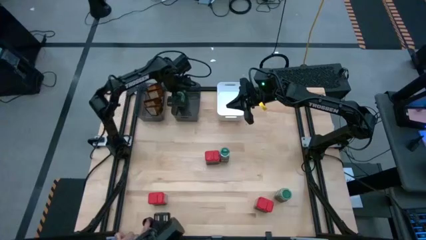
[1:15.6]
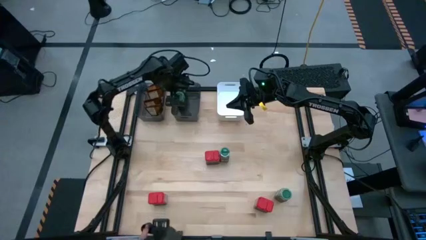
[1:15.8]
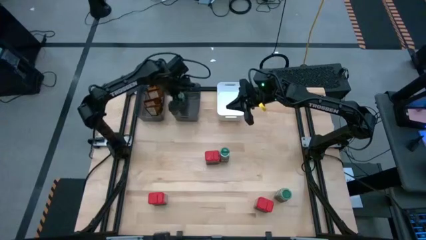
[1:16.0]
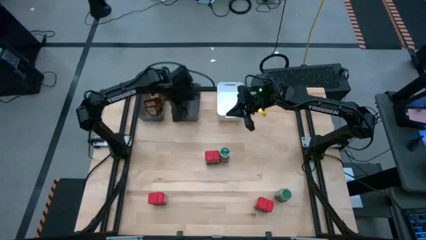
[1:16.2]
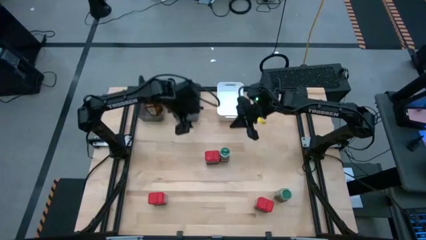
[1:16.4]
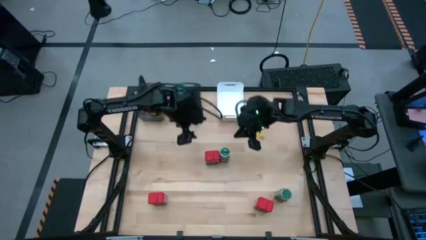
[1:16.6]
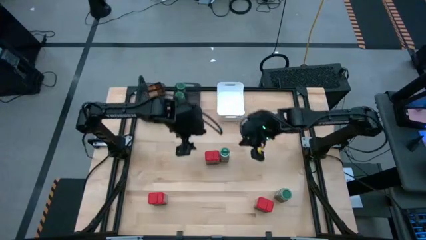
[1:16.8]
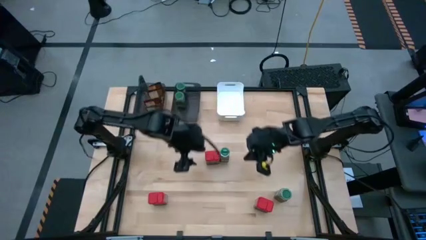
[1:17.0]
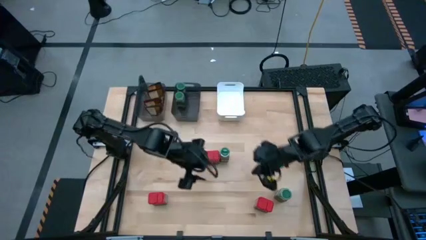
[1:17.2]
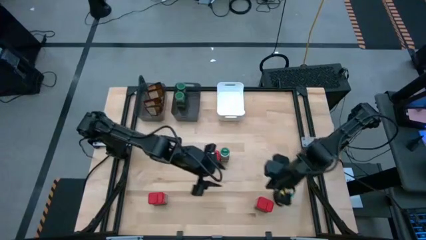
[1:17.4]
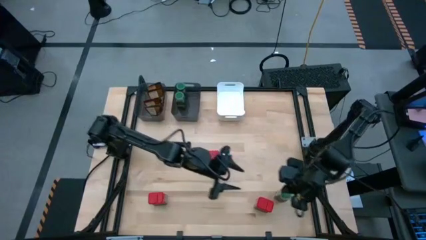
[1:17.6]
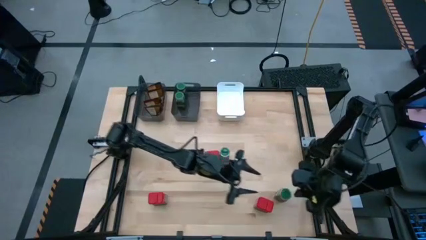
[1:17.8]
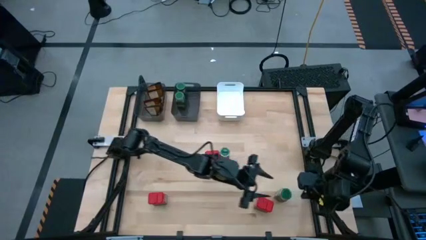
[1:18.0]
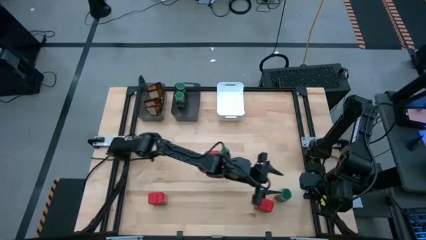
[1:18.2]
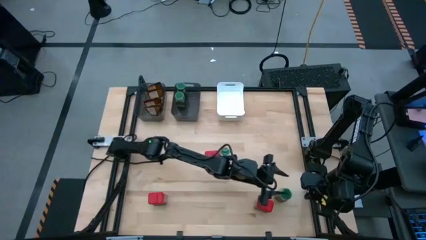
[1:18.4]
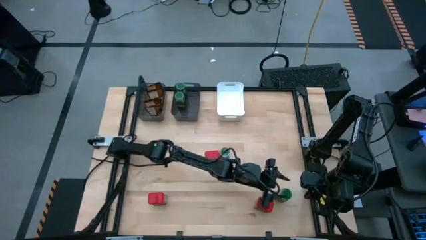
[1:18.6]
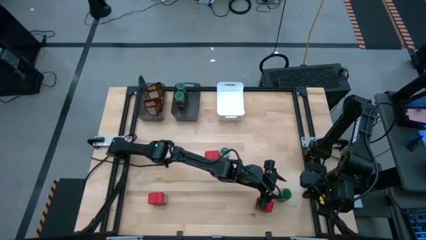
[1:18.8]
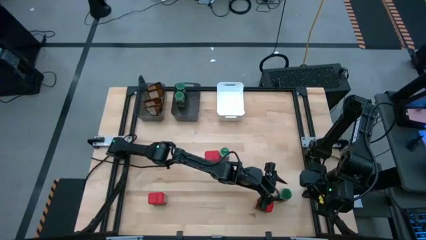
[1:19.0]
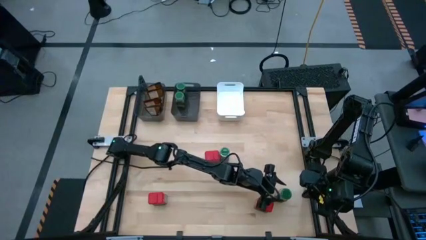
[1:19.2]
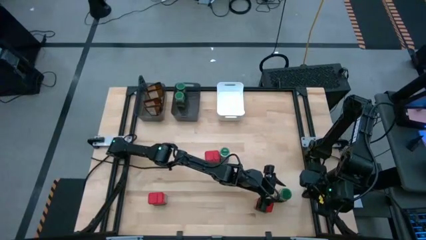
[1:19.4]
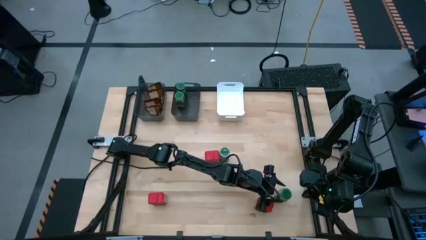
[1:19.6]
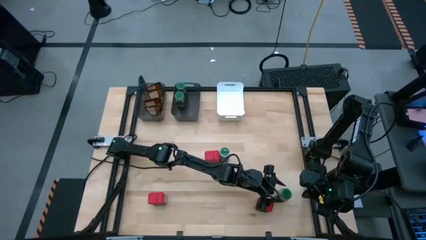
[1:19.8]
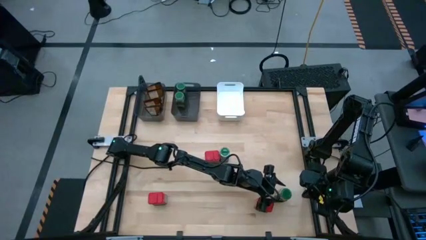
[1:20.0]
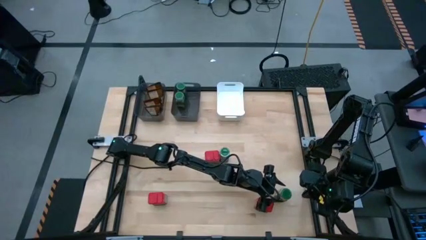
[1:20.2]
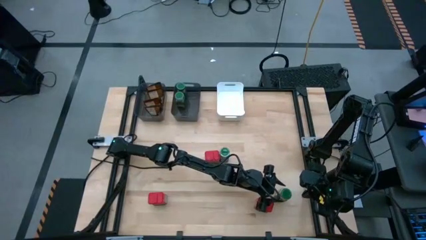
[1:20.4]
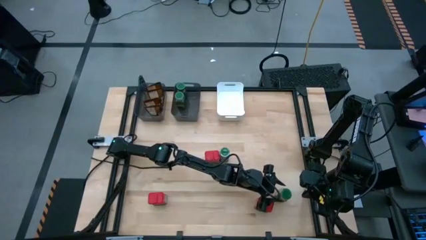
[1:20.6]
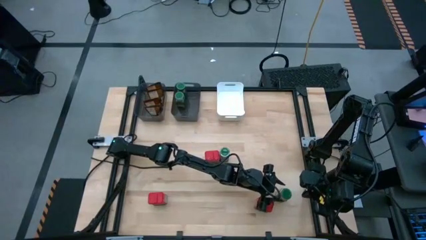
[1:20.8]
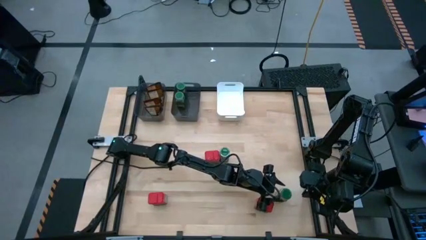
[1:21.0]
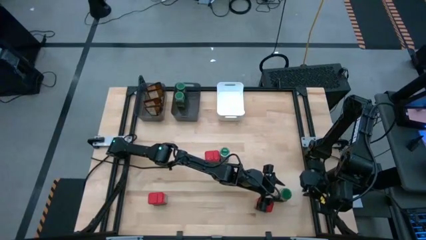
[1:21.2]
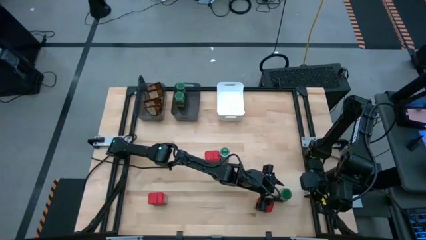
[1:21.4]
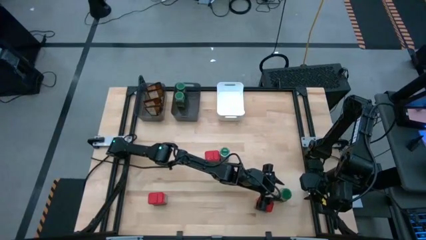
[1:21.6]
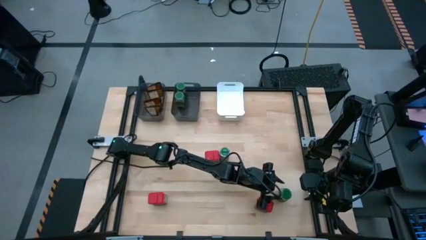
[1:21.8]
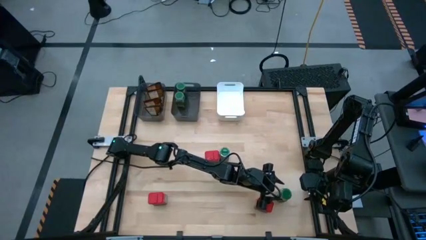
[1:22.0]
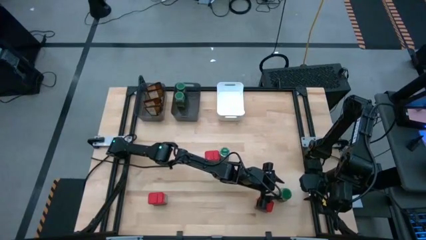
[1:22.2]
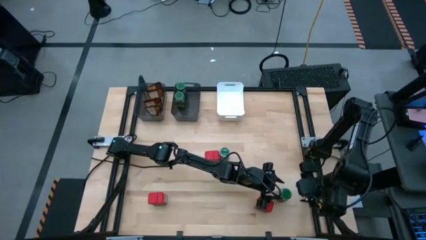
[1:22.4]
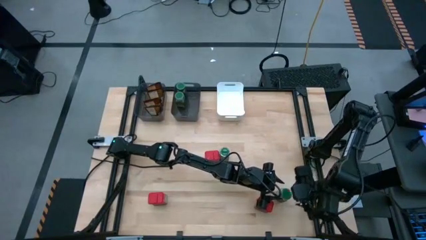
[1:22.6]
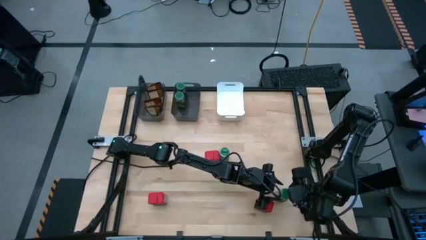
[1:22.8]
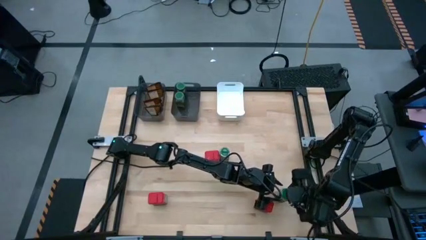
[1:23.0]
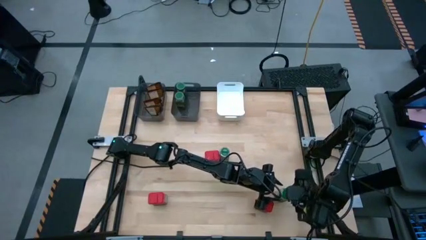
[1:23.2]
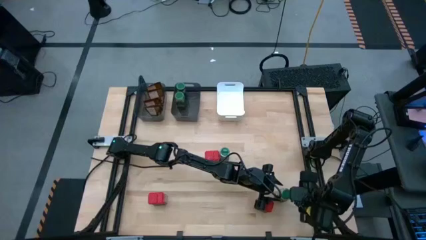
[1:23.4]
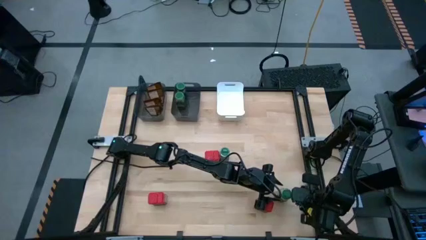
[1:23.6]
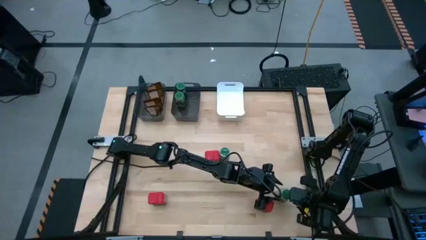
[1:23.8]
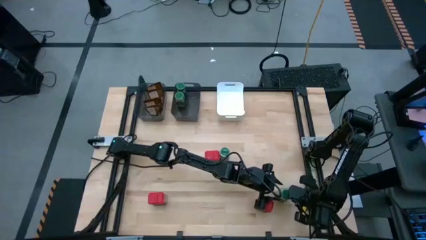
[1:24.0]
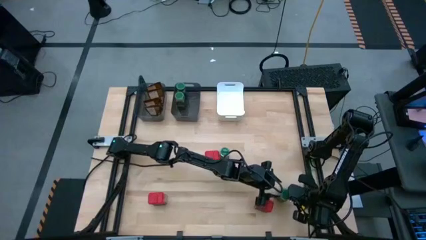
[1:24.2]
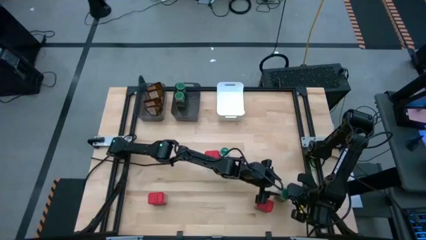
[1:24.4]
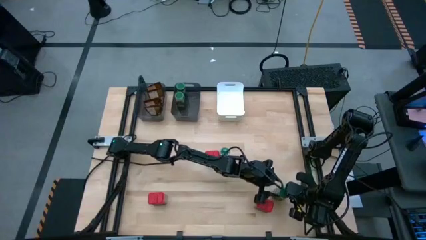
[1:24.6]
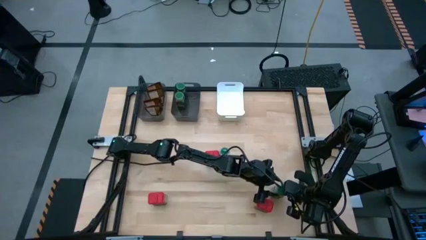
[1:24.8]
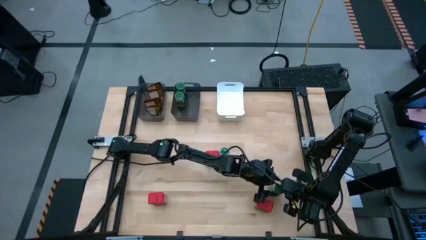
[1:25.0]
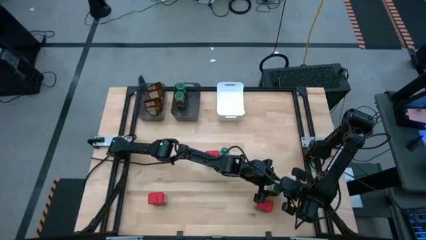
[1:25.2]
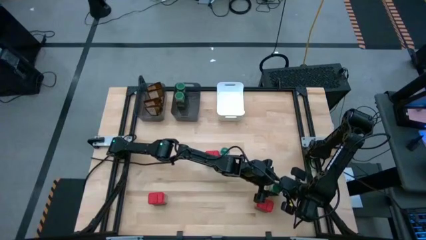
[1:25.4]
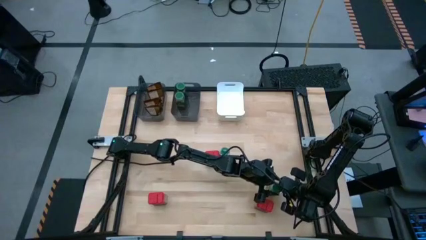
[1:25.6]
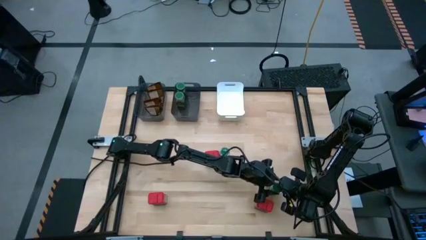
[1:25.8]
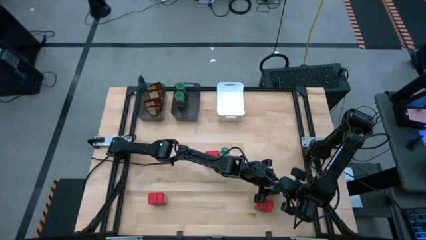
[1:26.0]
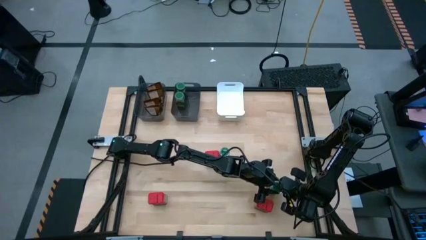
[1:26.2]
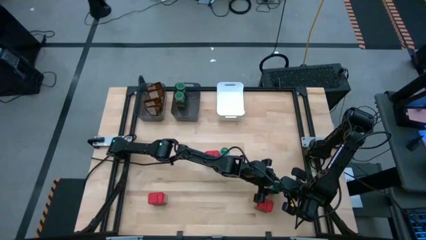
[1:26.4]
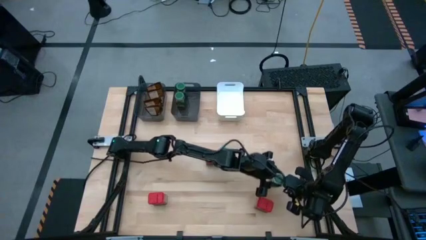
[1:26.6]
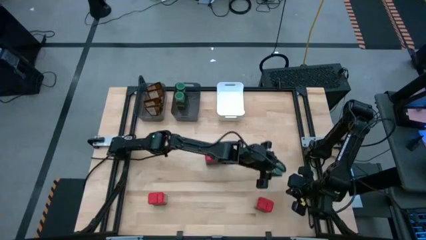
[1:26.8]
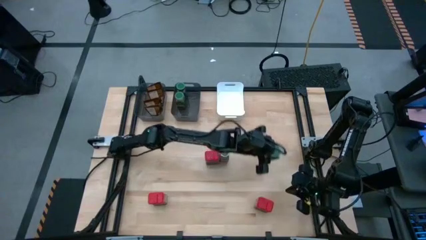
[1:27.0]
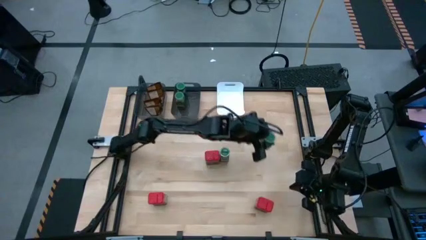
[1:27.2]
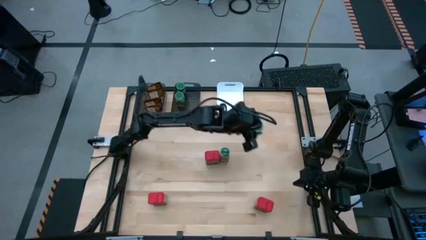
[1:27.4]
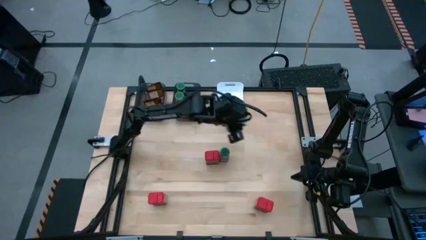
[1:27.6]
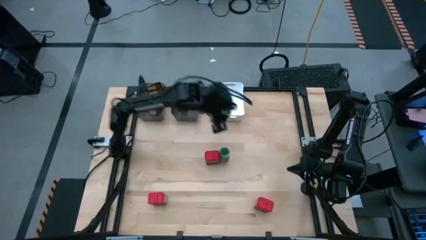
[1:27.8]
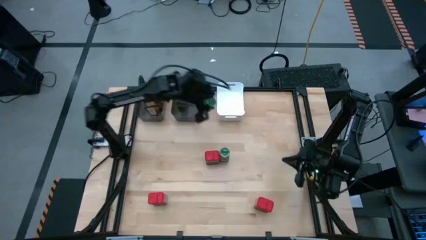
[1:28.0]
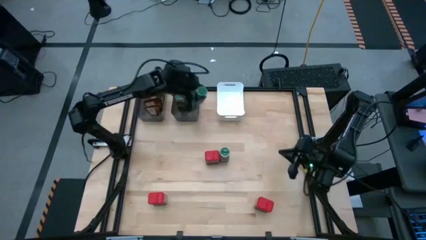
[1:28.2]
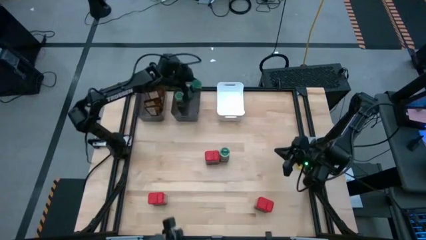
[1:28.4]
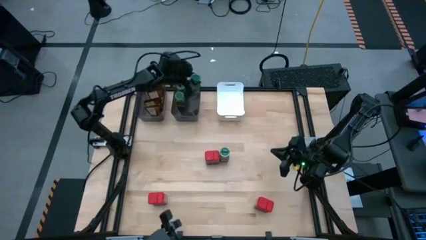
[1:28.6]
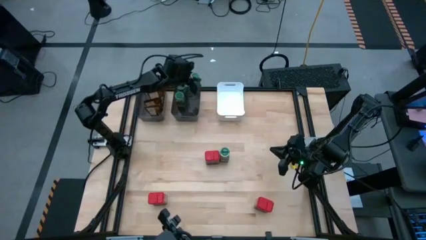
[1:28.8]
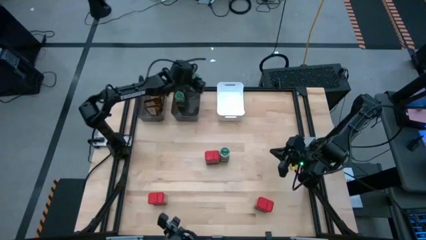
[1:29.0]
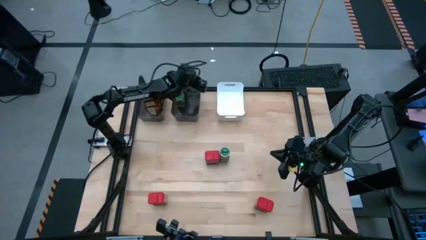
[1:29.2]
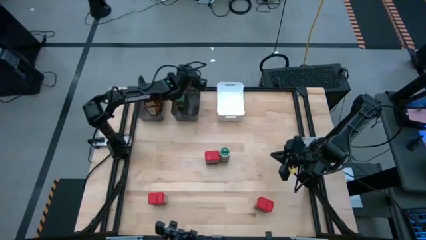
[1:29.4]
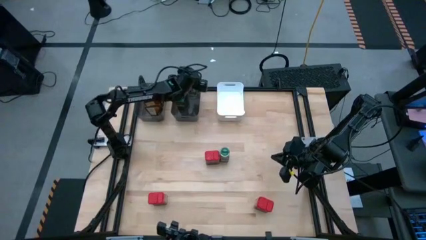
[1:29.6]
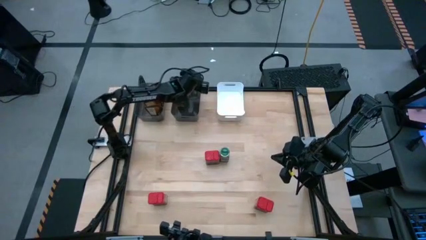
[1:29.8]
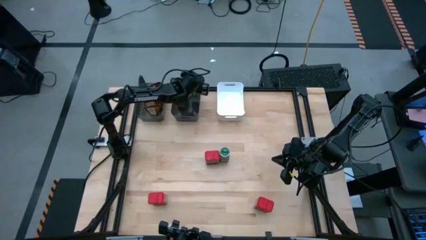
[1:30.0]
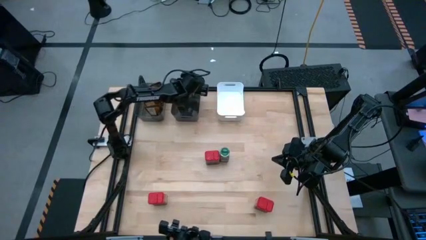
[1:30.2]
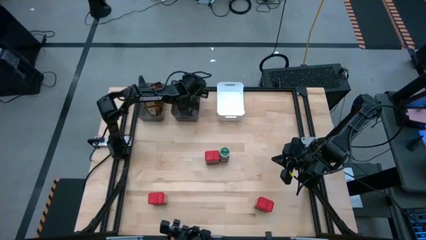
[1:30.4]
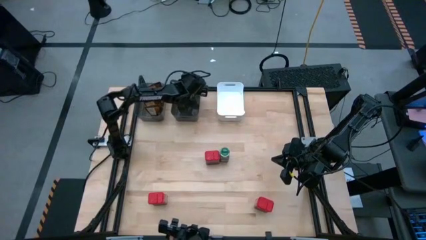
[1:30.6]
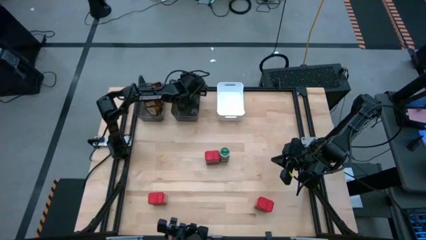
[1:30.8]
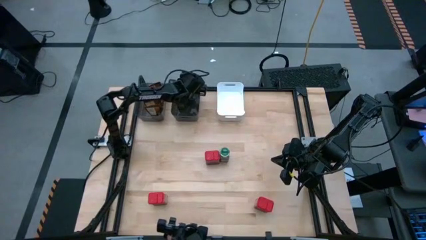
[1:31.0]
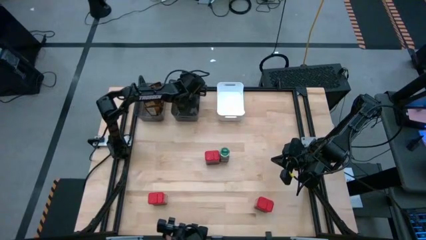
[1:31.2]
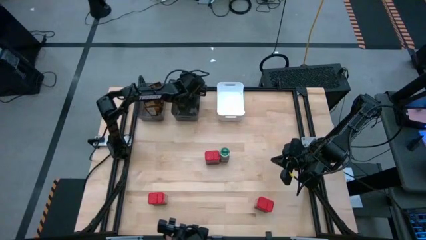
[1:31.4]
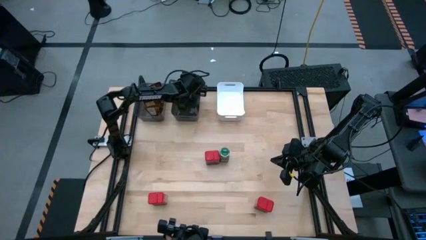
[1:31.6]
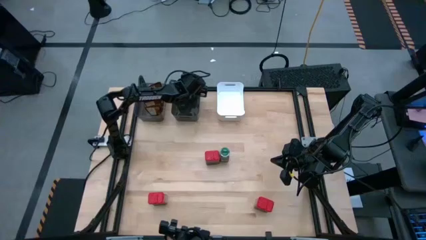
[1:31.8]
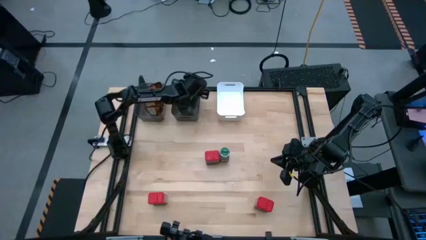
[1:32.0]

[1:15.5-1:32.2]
Task: Sort spices by type
Put the bottom green seasoning bottle into the right black bin

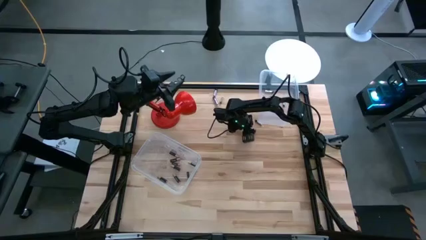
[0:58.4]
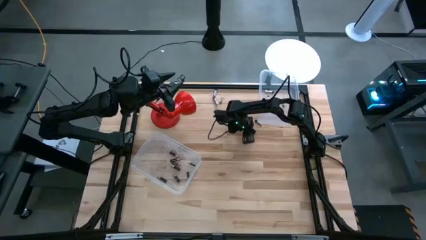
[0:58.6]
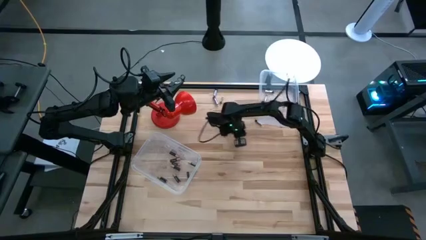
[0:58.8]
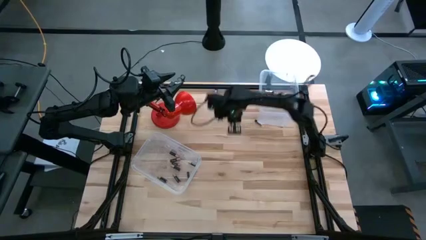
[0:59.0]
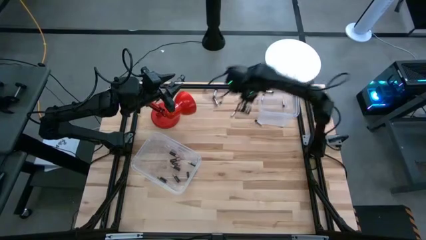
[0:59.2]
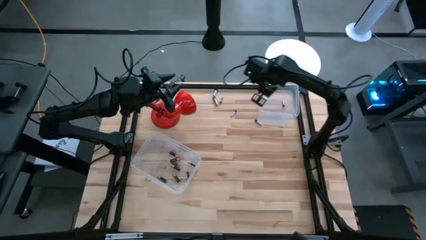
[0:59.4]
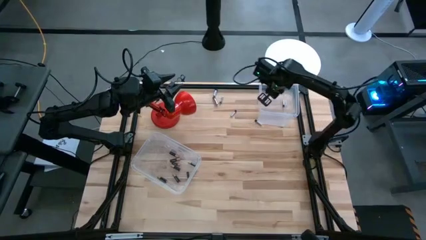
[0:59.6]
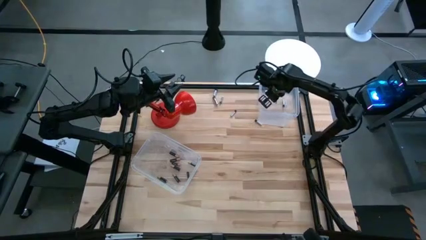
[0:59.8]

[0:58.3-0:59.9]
Task: Sort batteries
Put the silver battery into the top transparent bin
